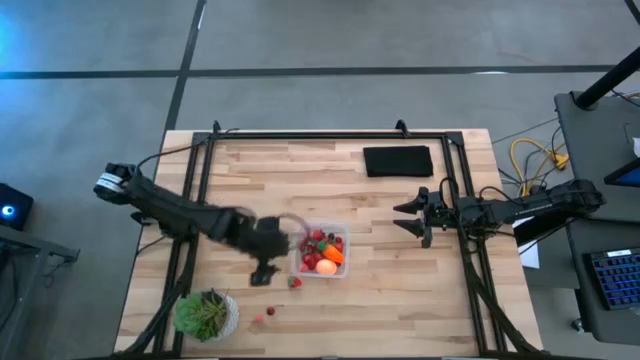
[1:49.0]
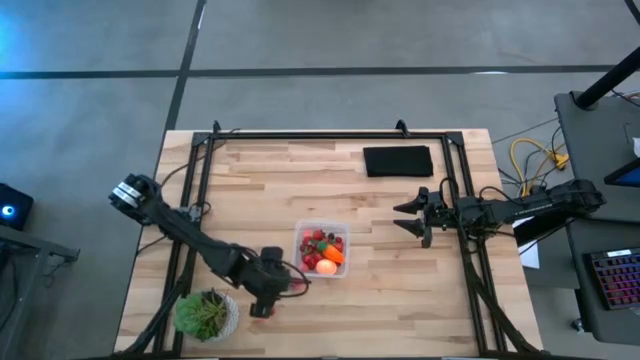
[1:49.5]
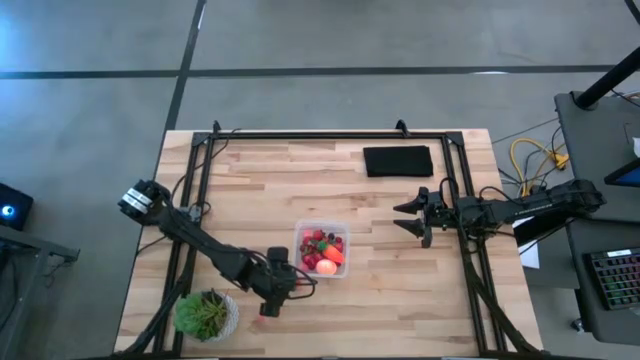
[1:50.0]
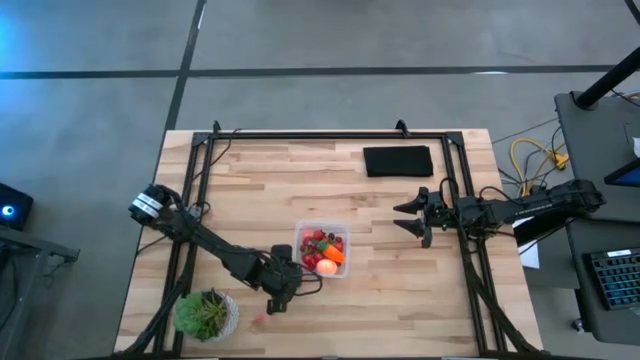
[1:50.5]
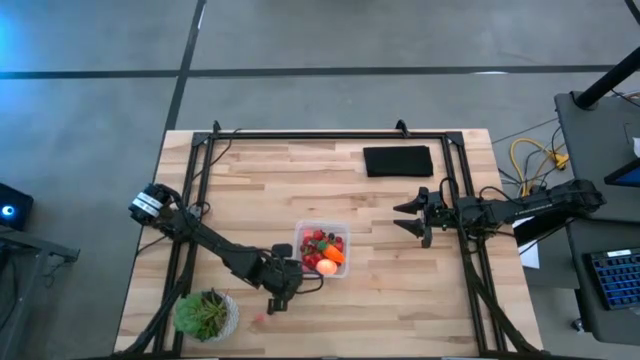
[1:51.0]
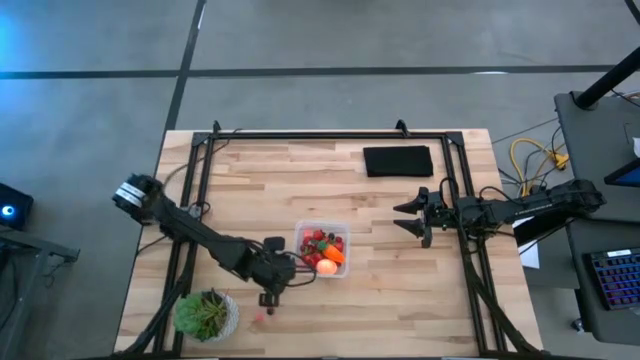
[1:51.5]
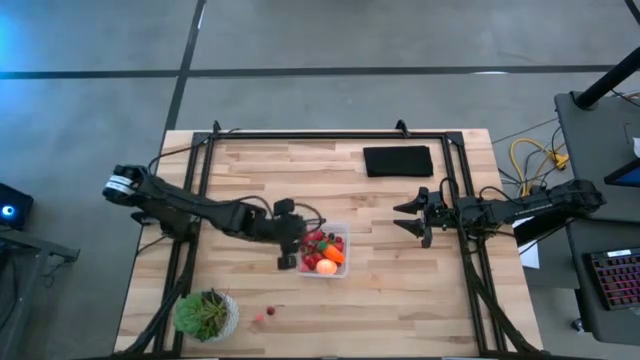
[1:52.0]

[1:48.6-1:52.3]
Task: Pick and placing Produce into tupperware
Put the red strawberry into the transparent container

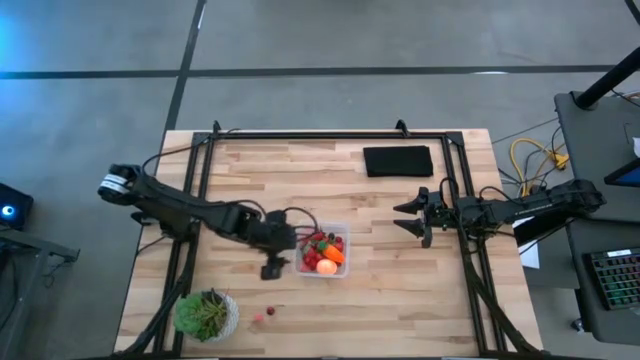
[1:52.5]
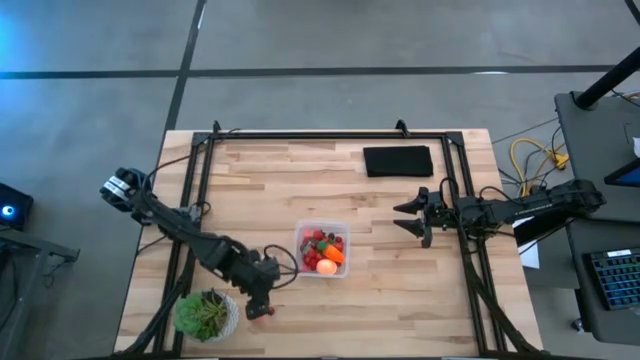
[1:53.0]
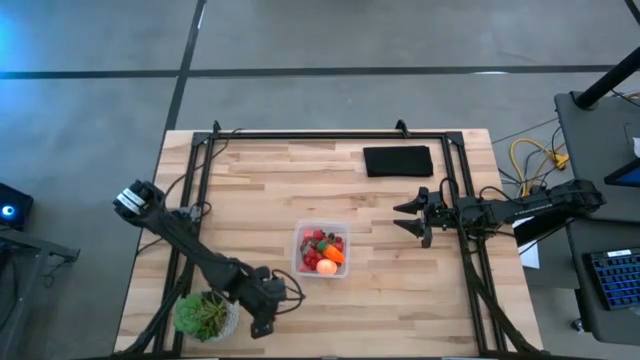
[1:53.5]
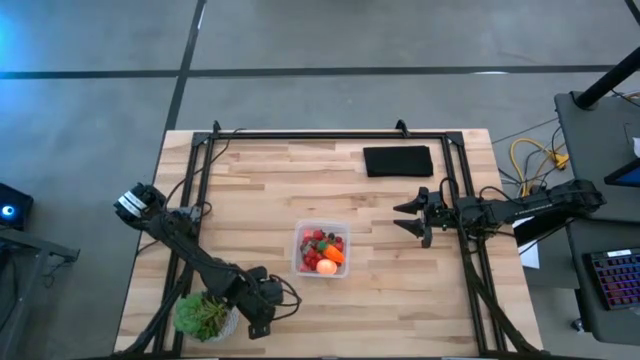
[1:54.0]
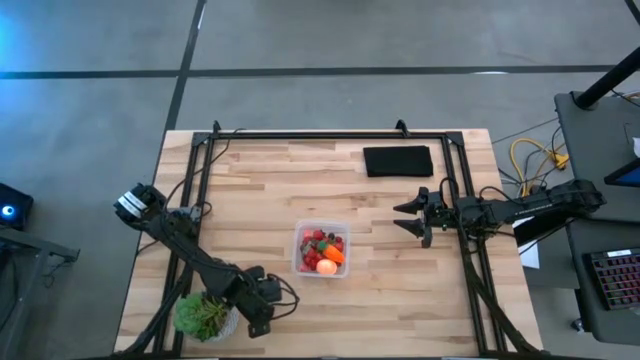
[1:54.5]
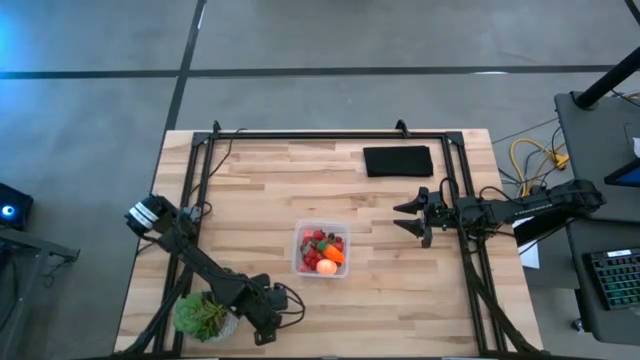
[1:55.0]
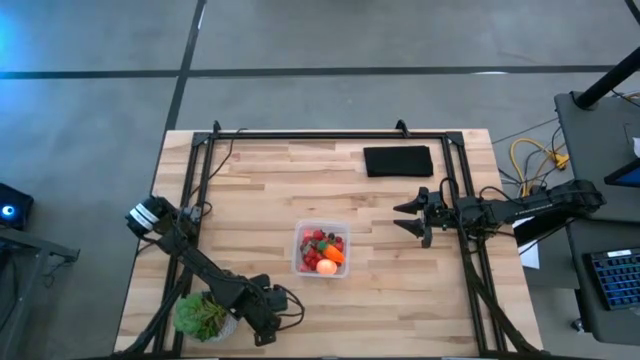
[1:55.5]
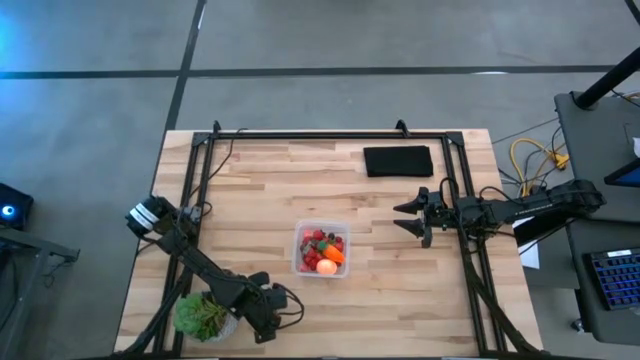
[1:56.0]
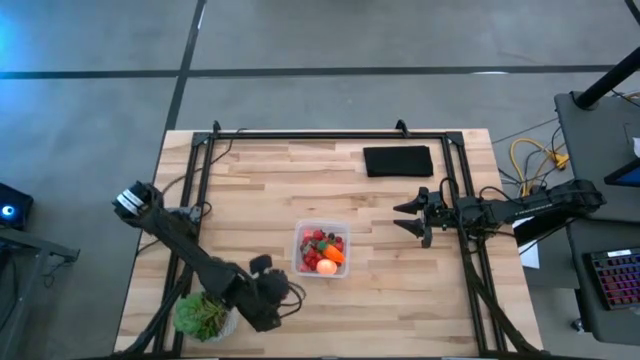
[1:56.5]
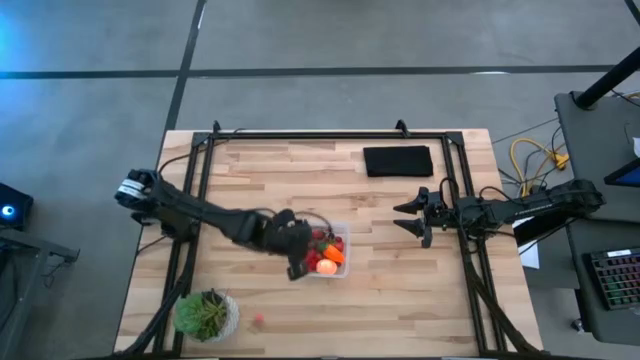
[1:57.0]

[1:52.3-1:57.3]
Put the red cherry into the transparent container

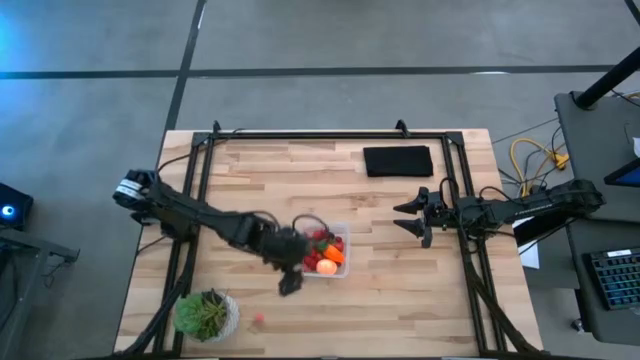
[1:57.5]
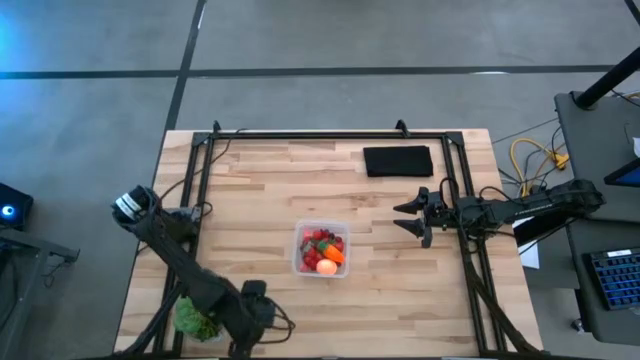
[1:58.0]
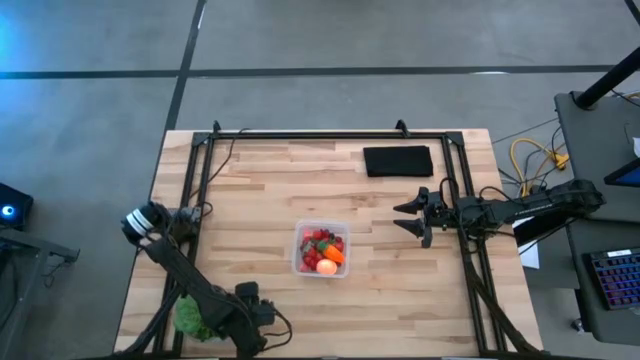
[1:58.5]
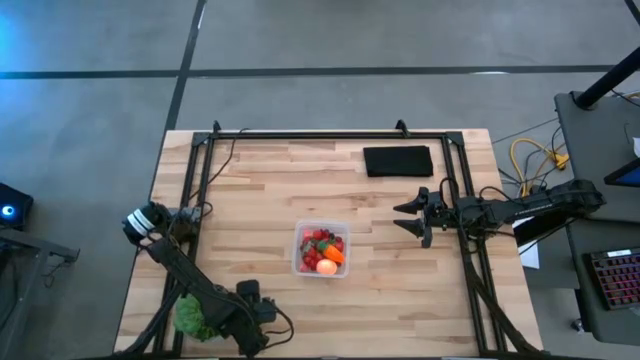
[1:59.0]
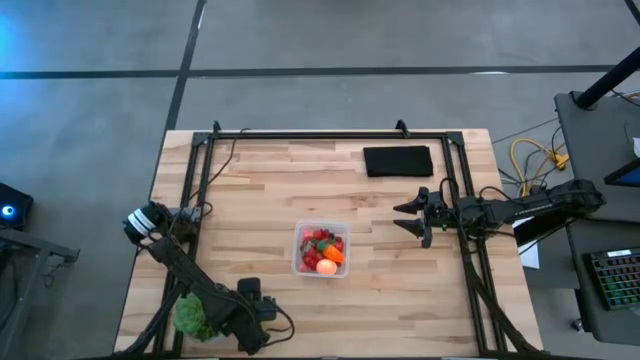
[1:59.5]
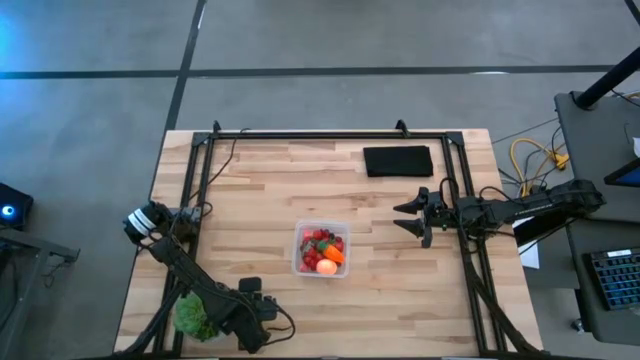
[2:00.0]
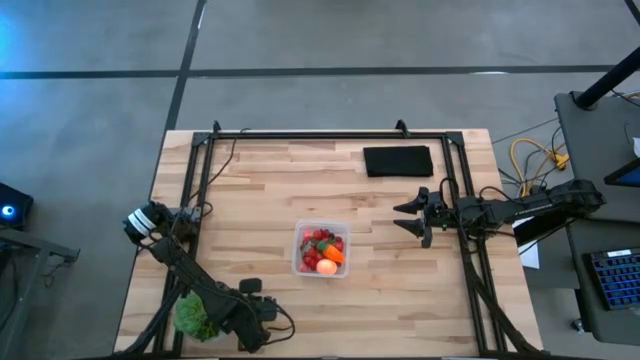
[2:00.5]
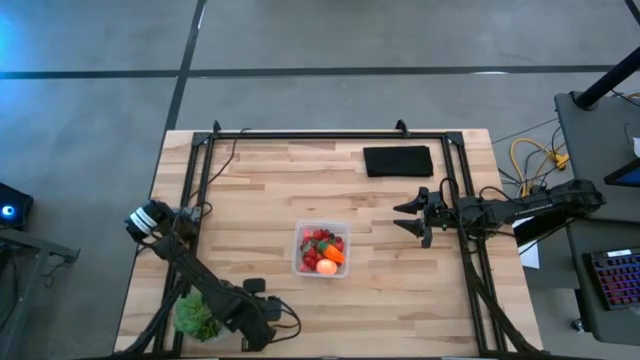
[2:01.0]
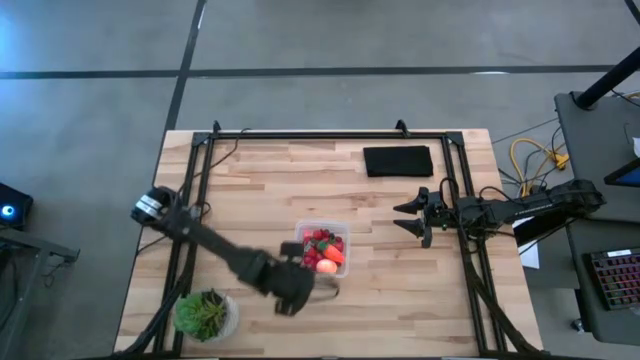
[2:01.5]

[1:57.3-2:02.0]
Put the pink peach into the transparent container

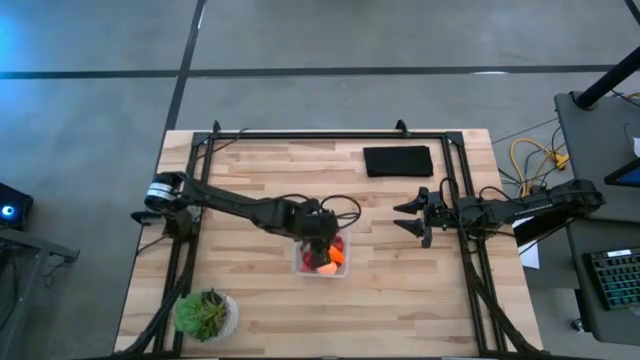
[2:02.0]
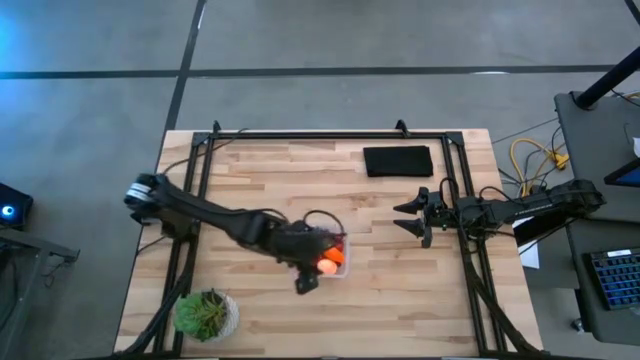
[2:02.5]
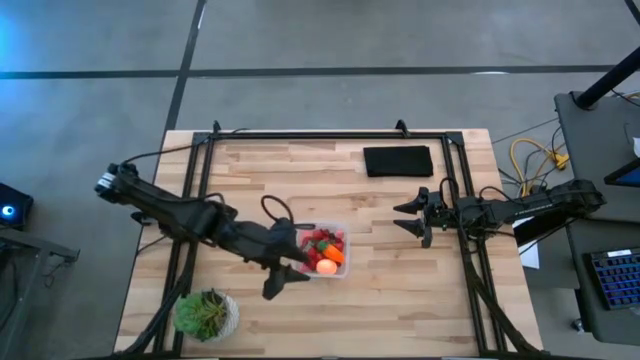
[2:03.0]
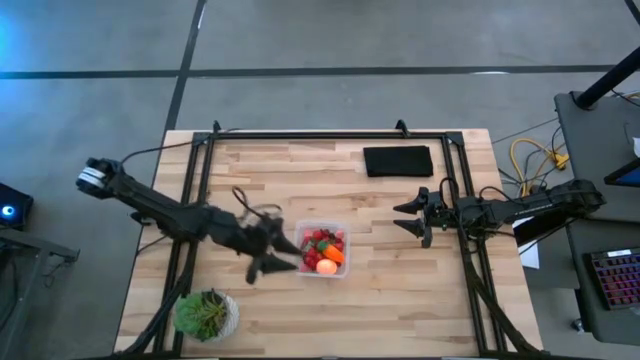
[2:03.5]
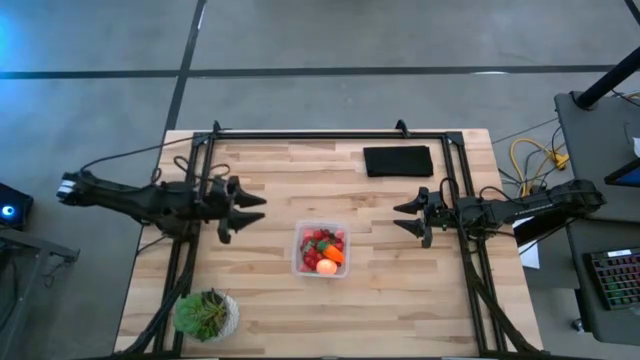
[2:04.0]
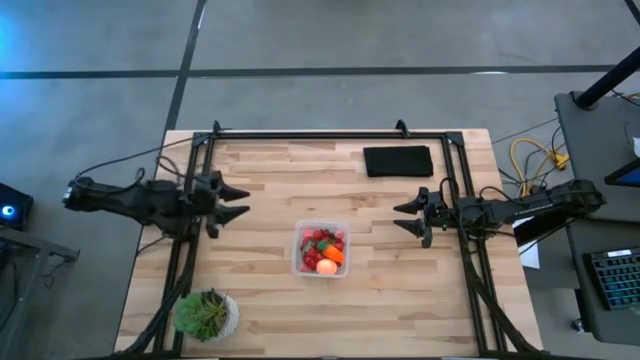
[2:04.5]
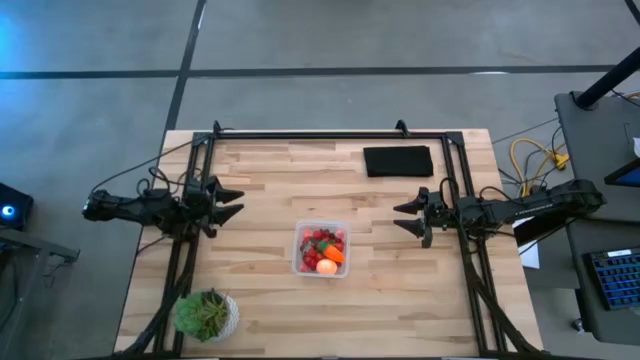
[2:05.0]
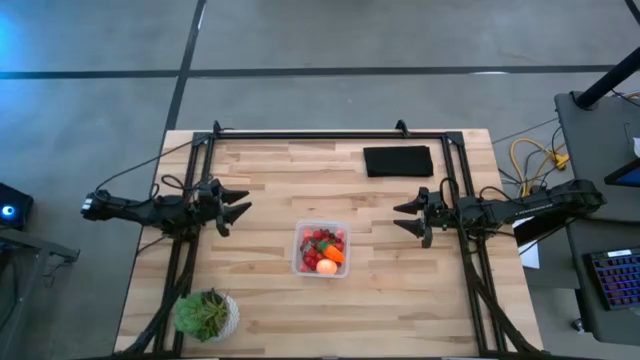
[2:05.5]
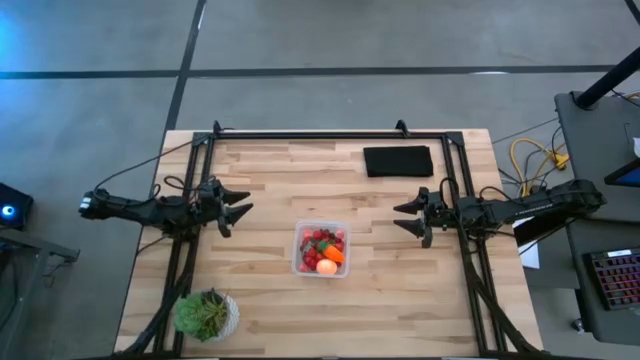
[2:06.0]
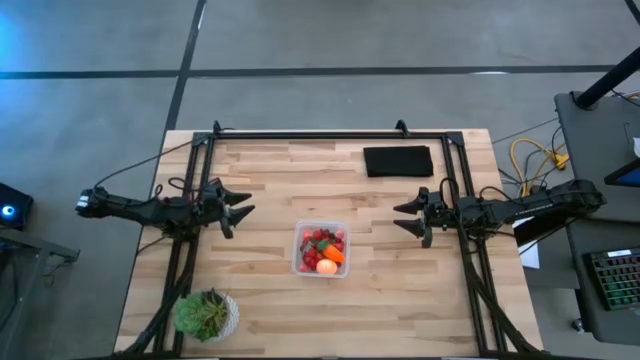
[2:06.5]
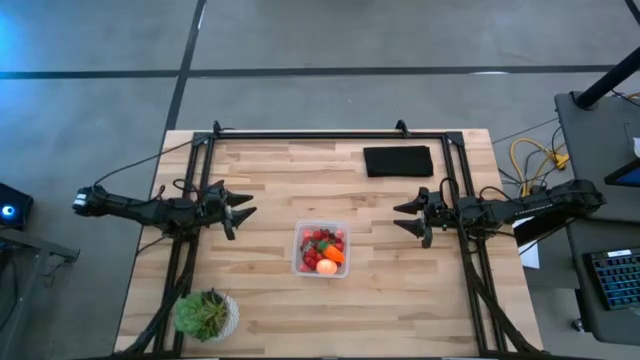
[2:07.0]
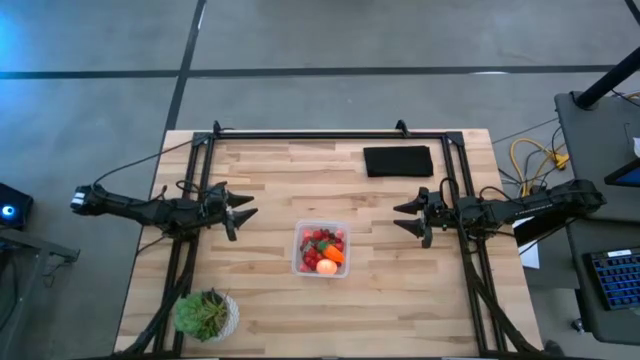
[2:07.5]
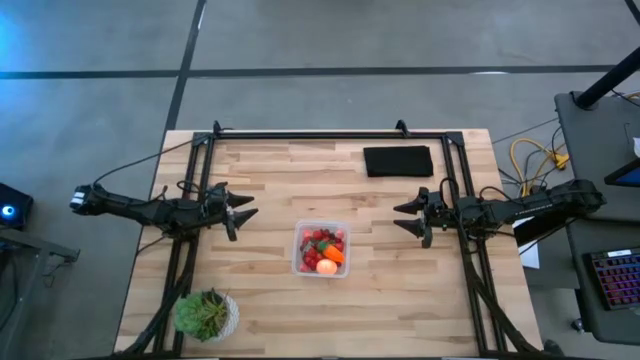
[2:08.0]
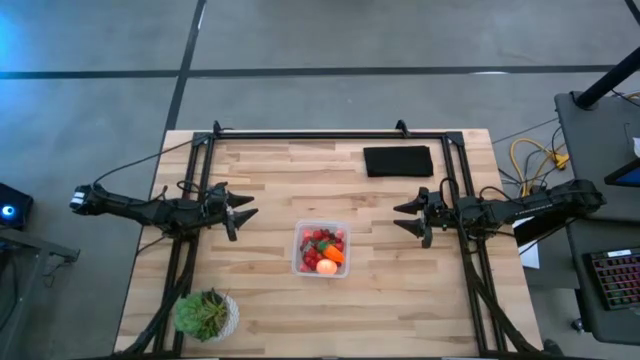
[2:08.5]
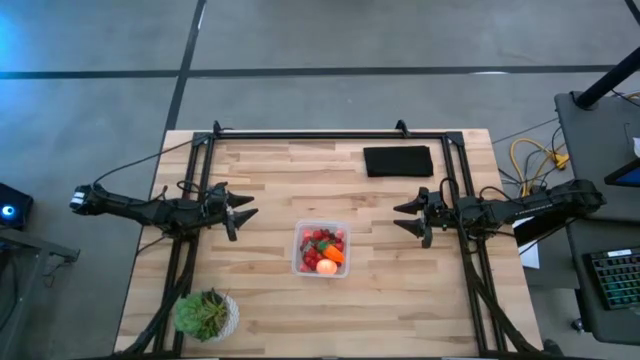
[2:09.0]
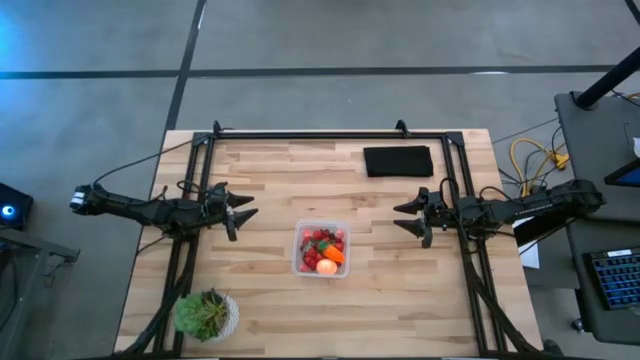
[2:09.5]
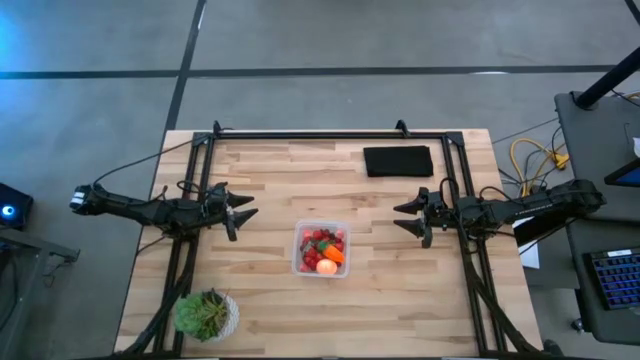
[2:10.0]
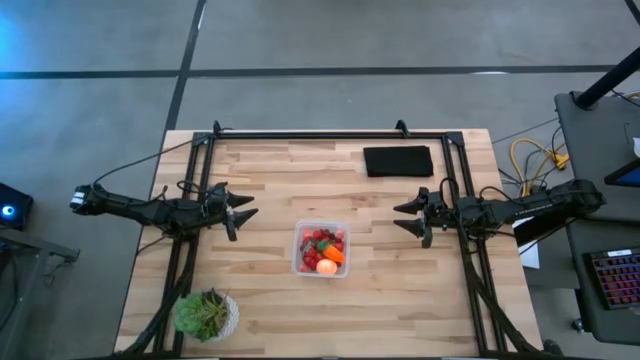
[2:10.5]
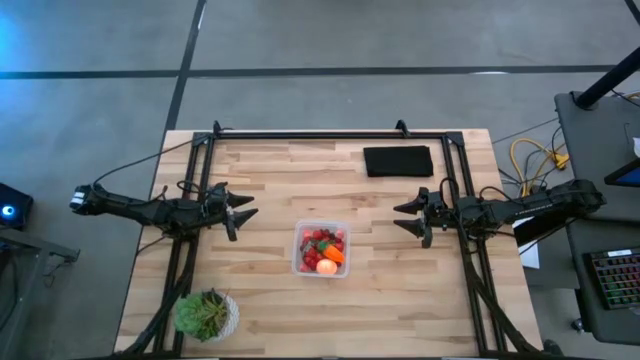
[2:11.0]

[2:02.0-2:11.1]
Return to Home Position
